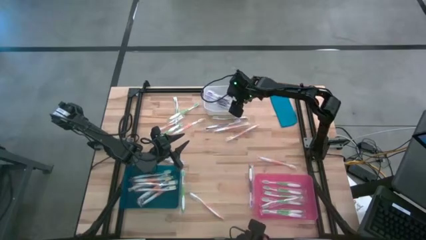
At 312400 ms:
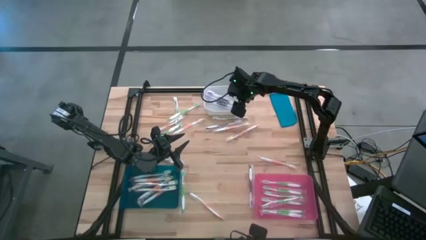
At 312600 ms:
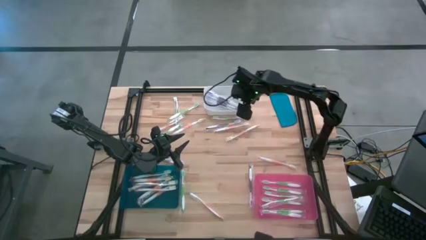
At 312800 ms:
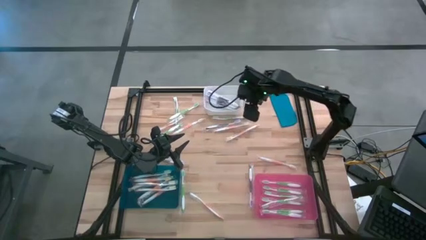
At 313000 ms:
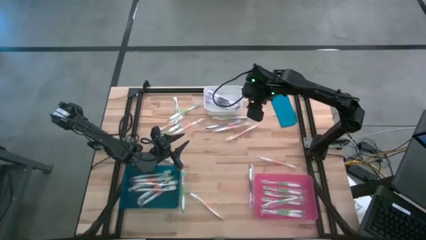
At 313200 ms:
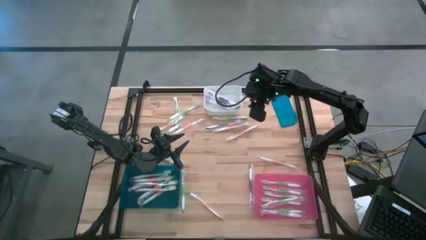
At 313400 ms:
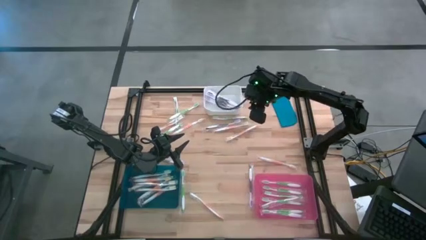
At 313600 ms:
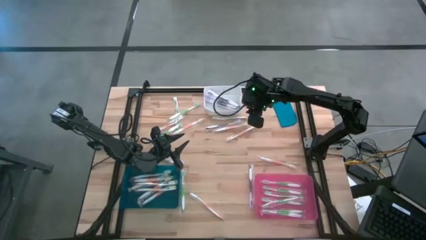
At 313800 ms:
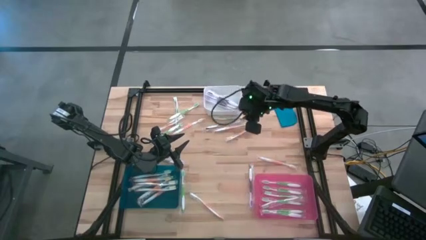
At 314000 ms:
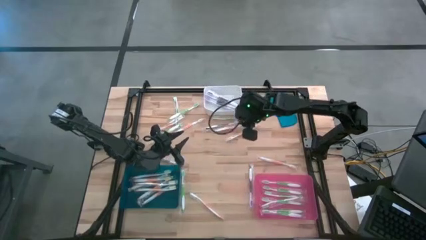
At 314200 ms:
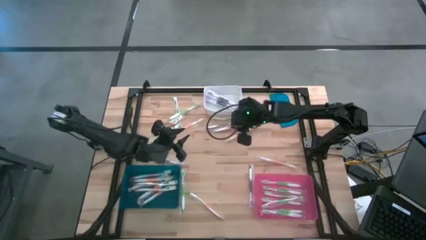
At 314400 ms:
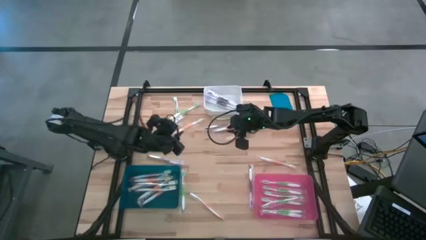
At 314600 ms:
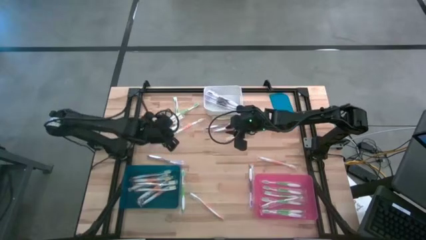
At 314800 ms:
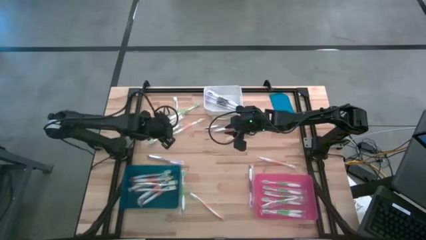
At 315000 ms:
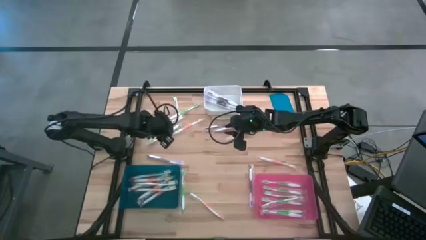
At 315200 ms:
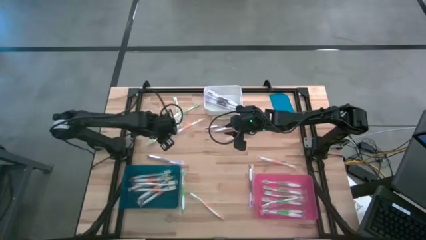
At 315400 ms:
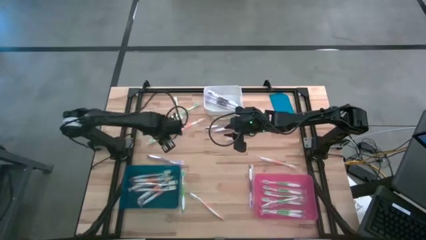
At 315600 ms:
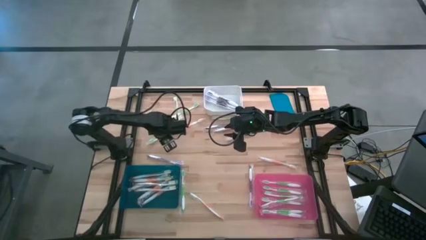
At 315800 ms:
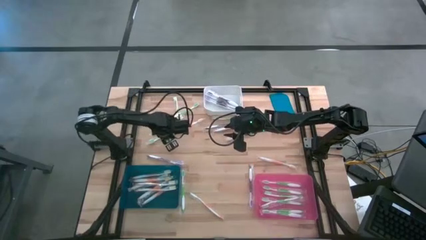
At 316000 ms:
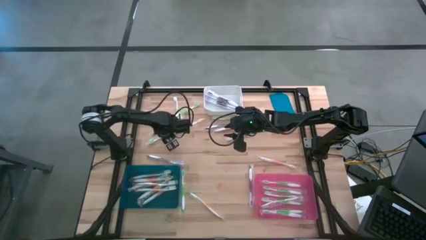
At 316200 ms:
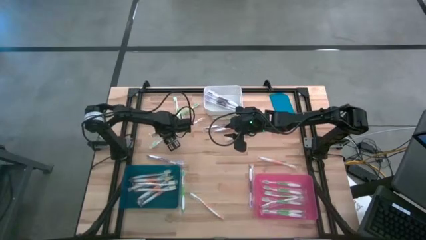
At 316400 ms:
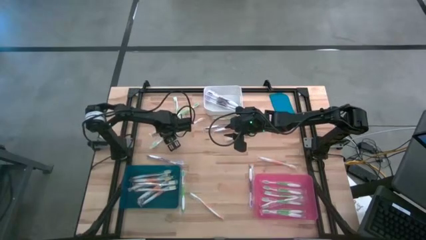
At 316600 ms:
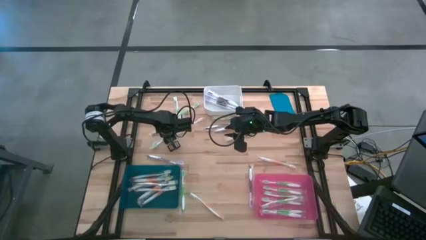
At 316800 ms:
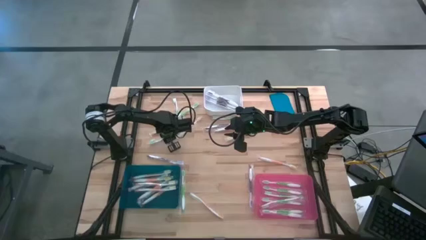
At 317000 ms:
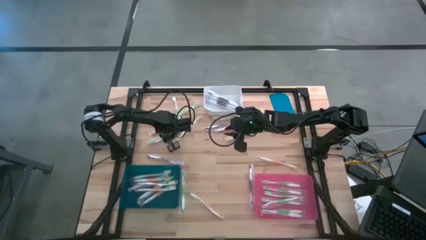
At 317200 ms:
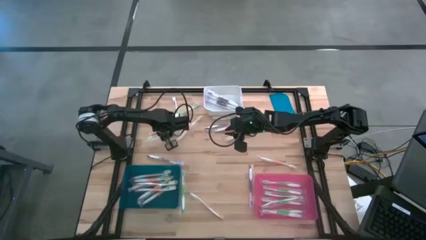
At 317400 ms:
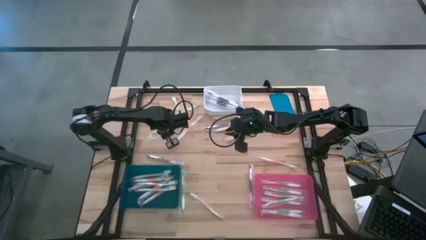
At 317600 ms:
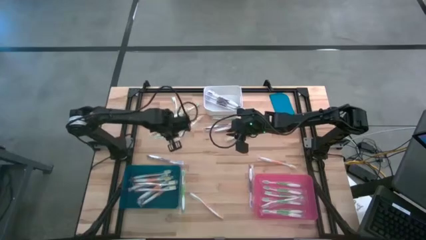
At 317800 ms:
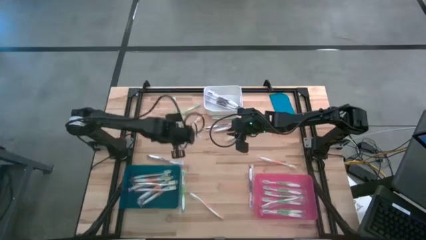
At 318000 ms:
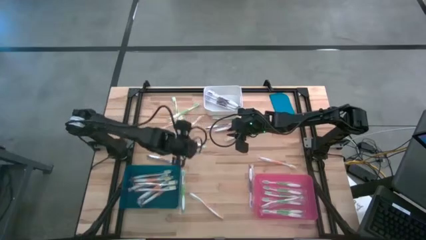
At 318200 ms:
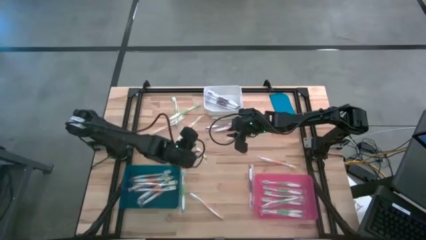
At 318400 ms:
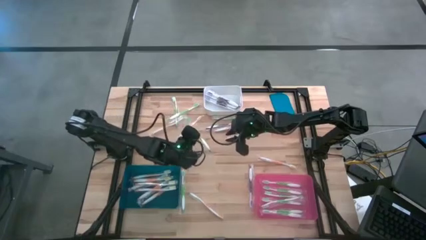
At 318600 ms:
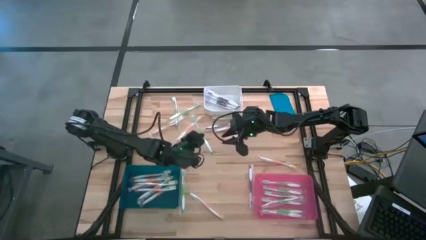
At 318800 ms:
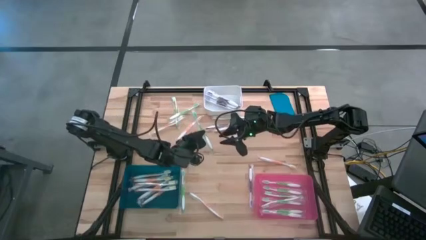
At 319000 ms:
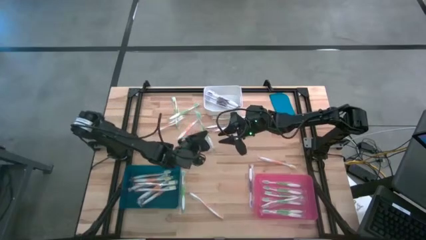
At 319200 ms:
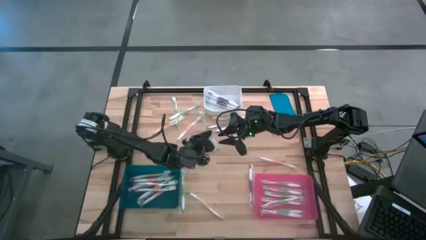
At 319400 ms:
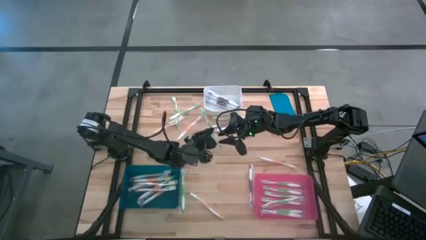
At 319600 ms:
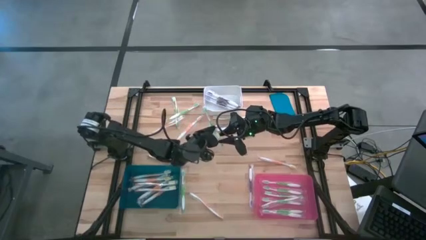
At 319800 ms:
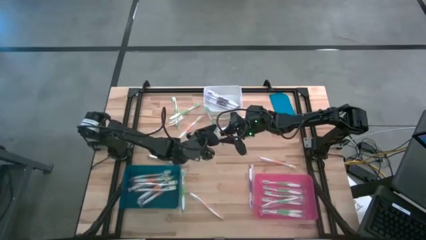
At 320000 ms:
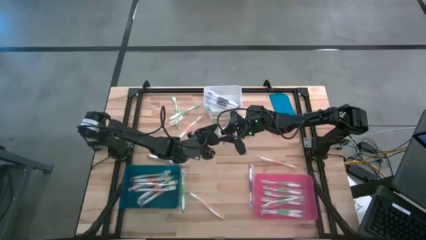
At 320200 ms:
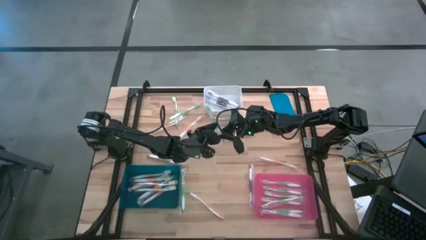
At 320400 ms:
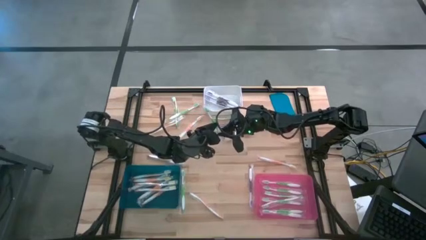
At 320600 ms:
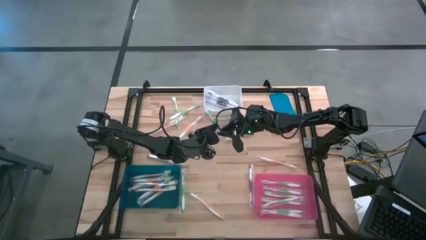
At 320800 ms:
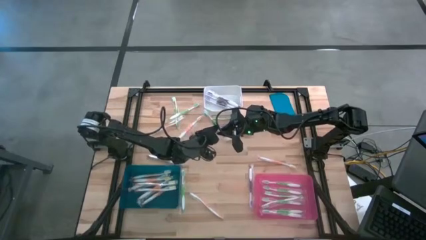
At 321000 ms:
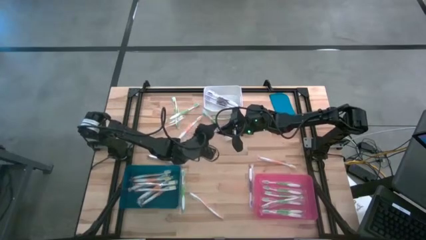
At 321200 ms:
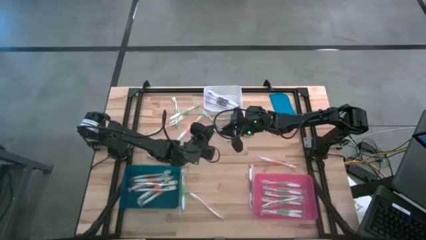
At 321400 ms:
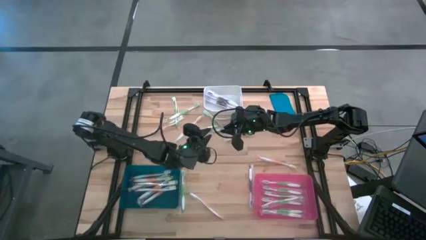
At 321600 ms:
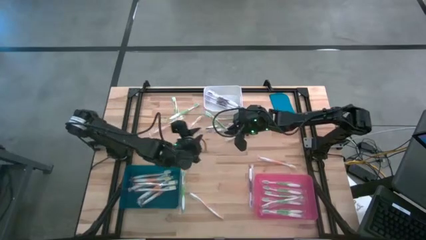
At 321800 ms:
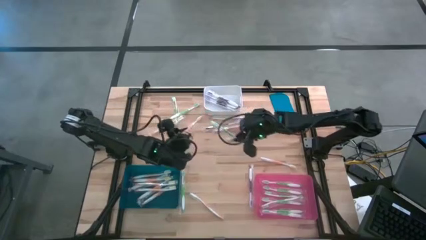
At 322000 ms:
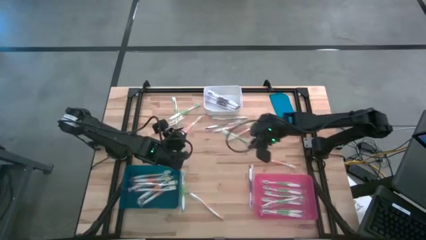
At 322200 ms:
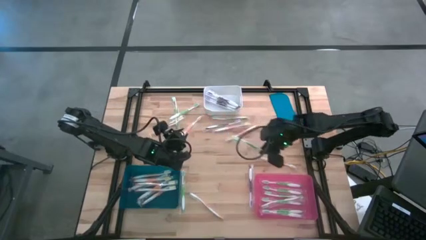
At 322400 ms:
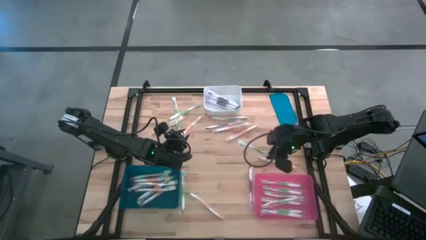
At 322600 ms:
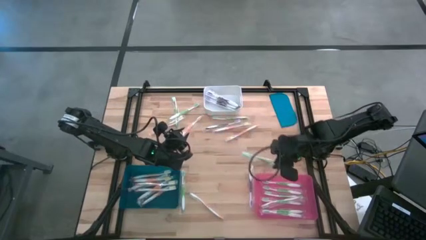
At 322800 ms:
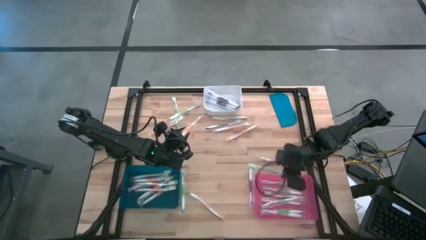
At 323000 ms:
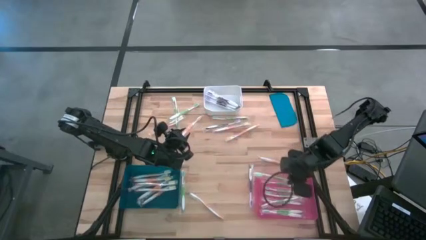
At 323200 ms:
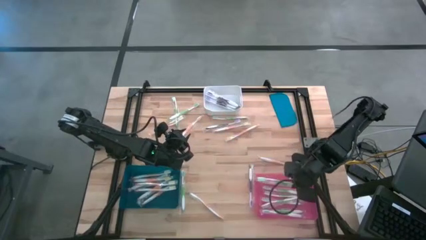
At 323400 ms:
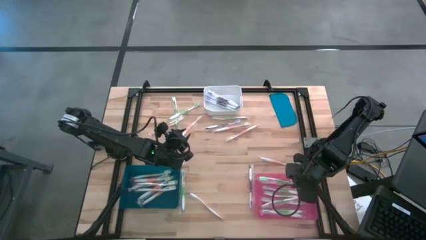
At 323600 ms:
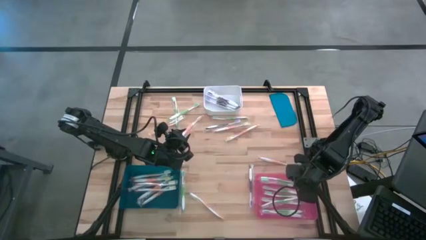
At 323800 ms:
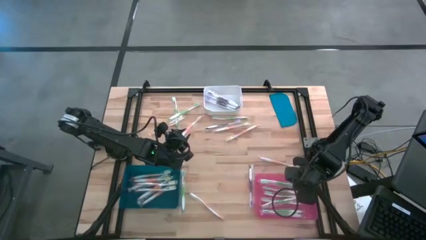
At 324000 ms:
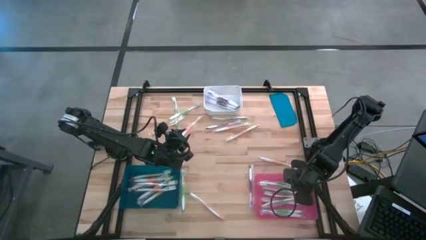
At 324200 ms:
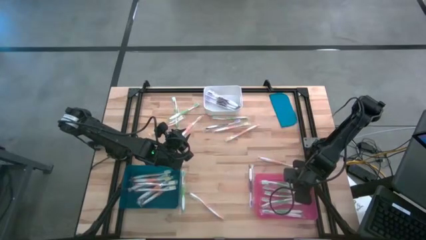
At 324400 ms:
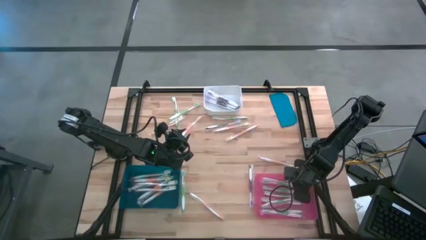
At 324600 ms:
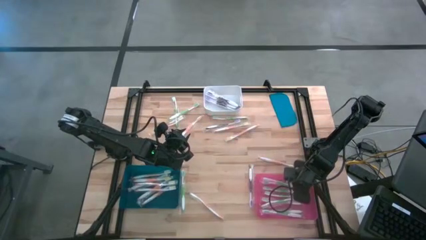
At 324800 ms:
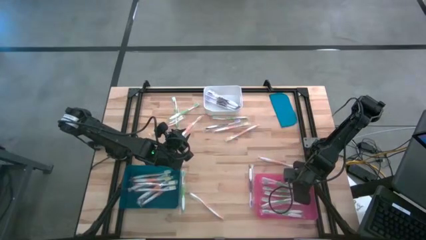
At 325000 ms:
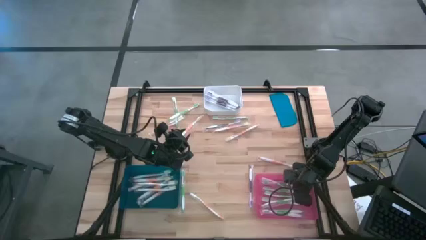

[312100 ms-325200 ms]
Task: Pick & Place Toothbrushes
Put the green toothbrush into the pink bin
